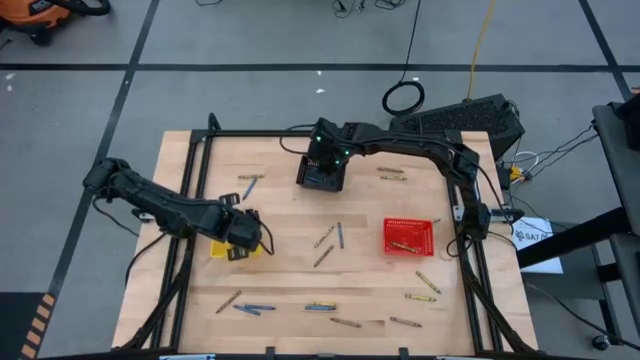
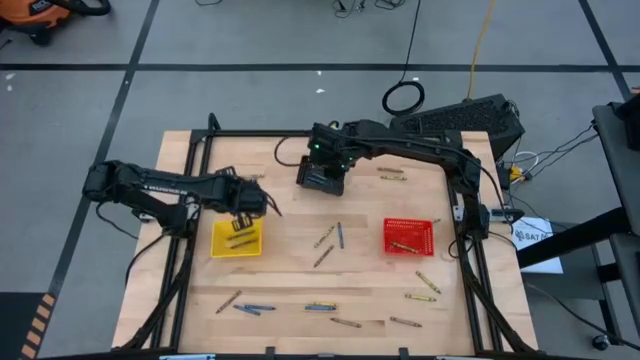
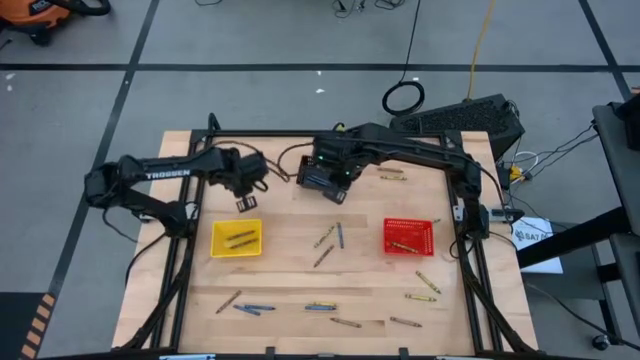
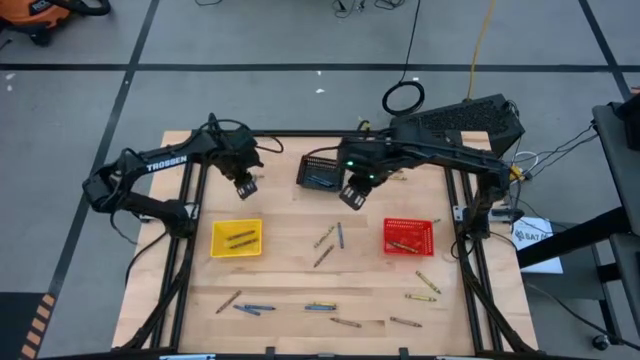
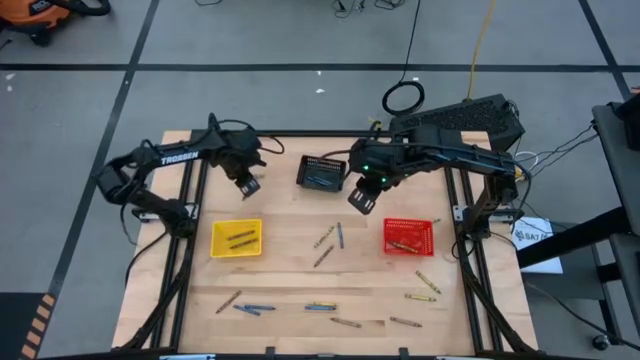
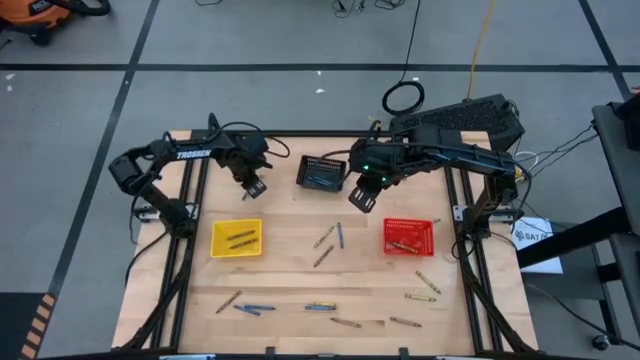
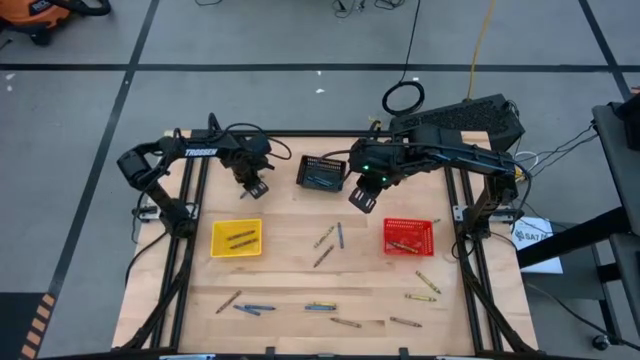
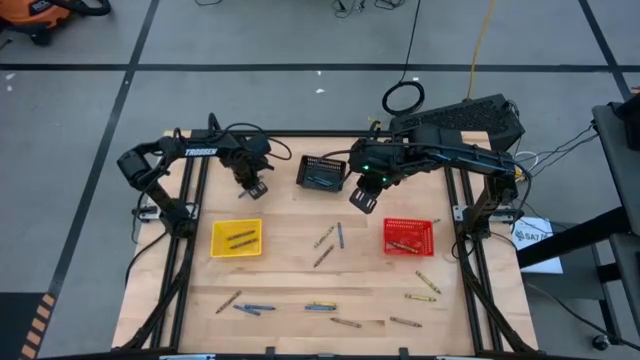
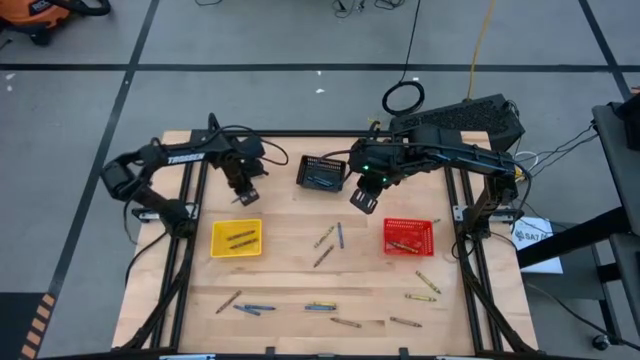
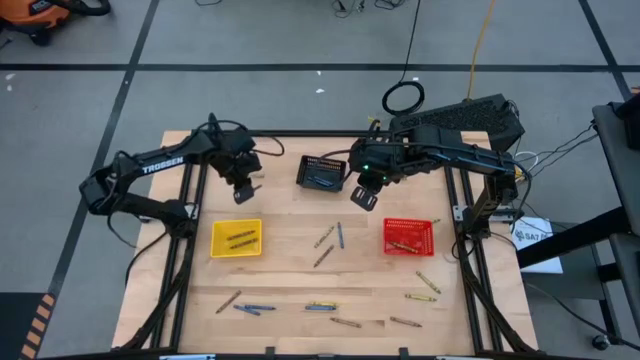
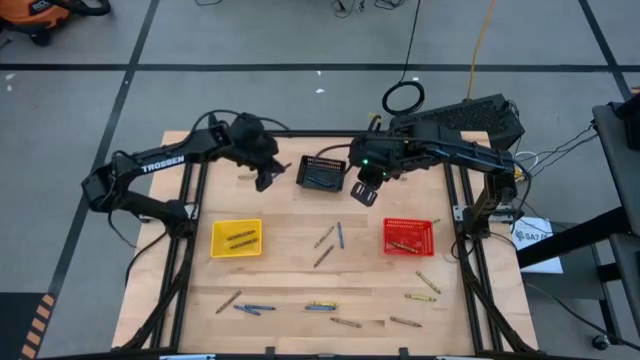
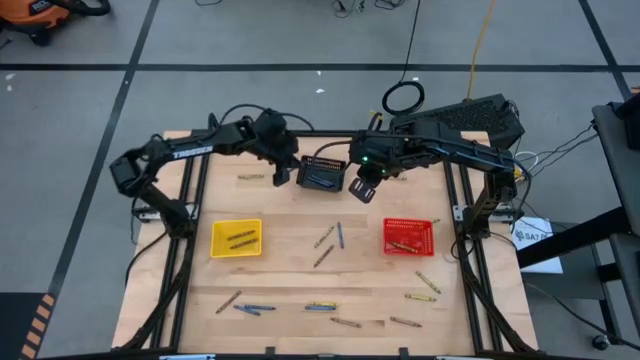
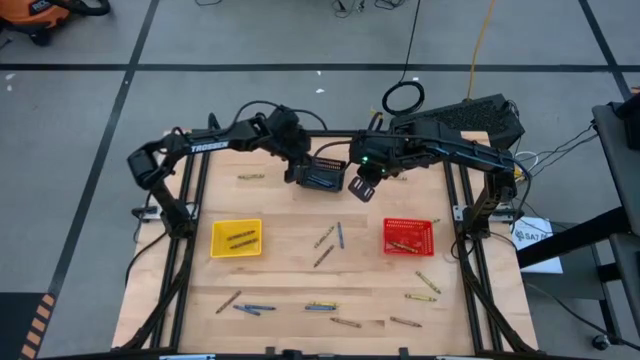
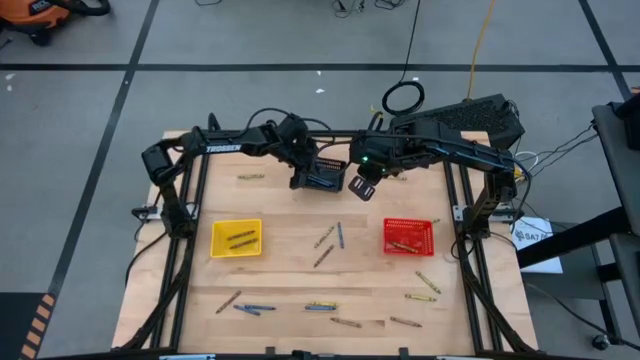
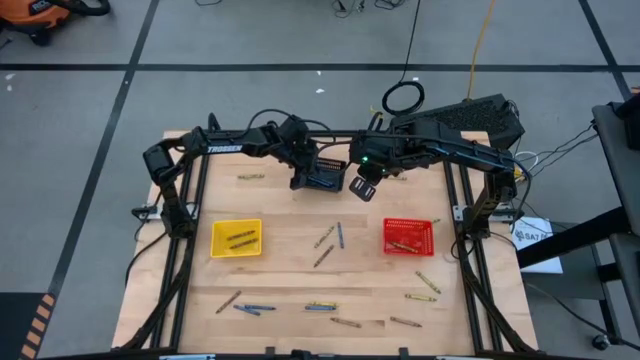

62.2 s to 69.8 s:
Task: Sort crayons
Put the blue crayon into the black bin

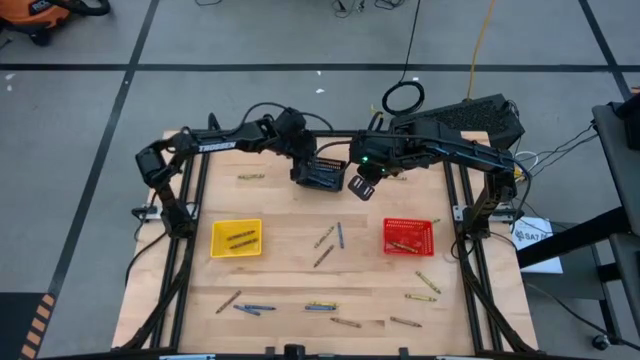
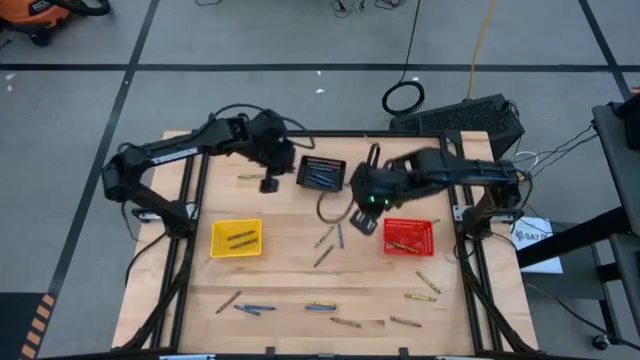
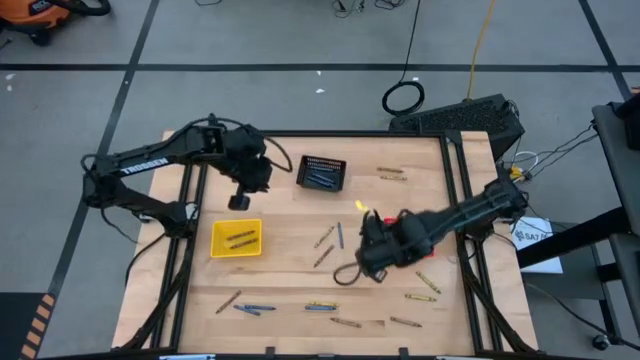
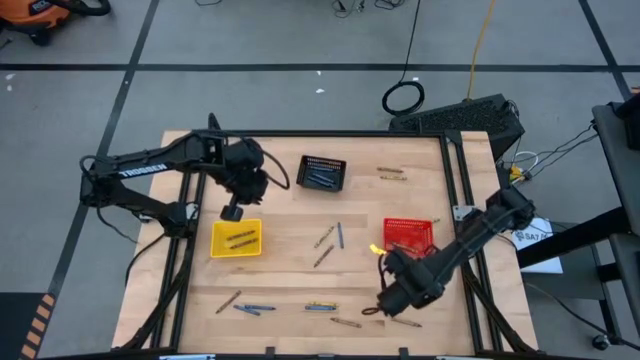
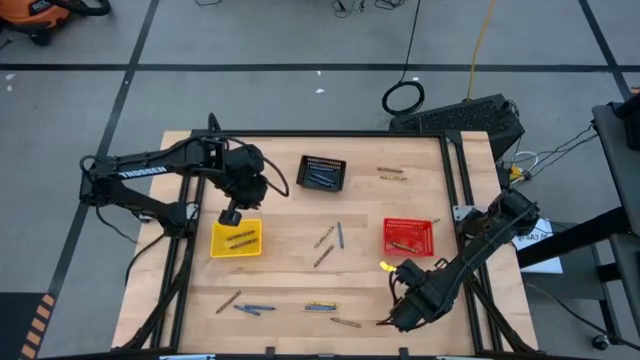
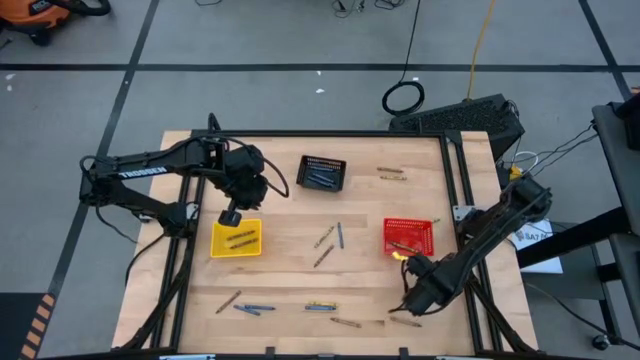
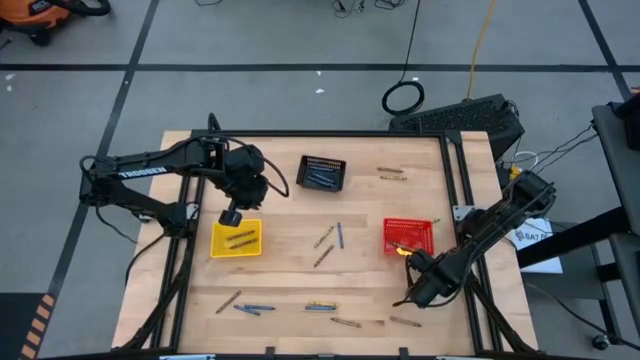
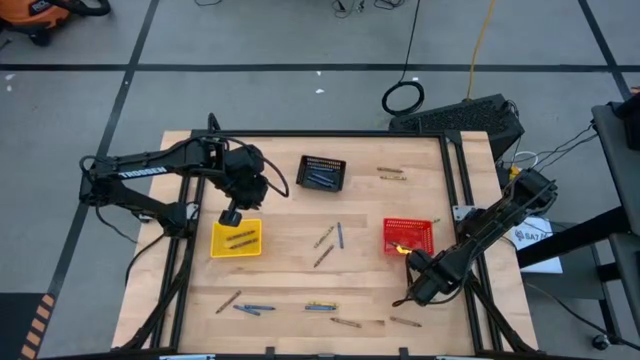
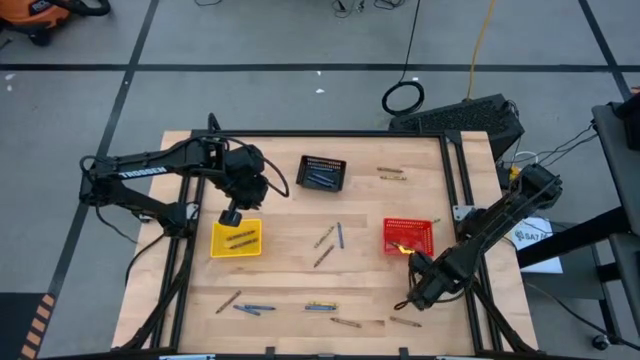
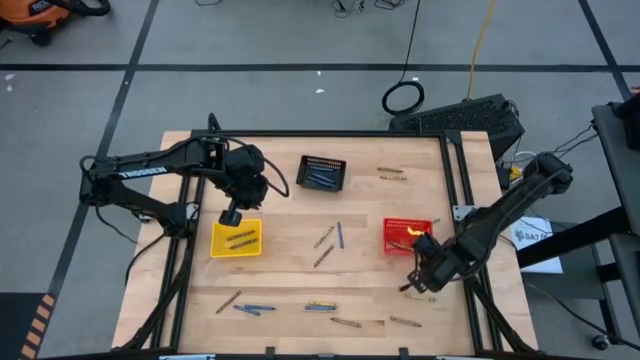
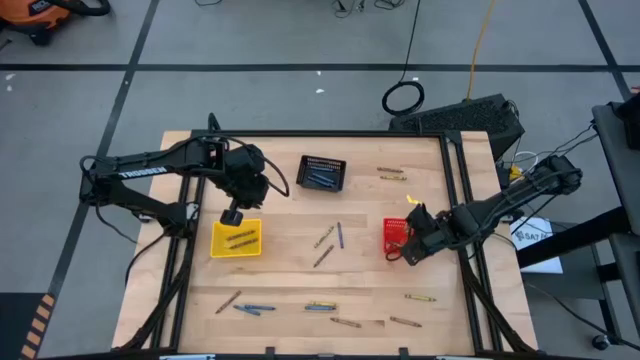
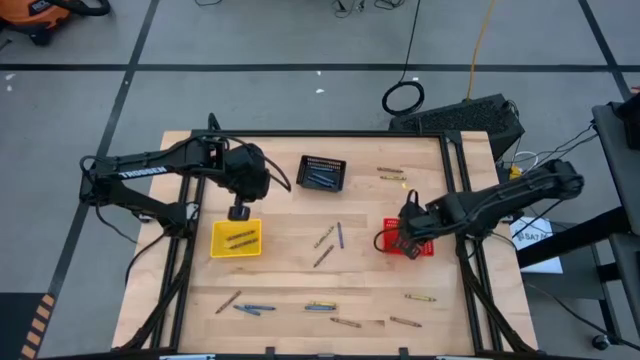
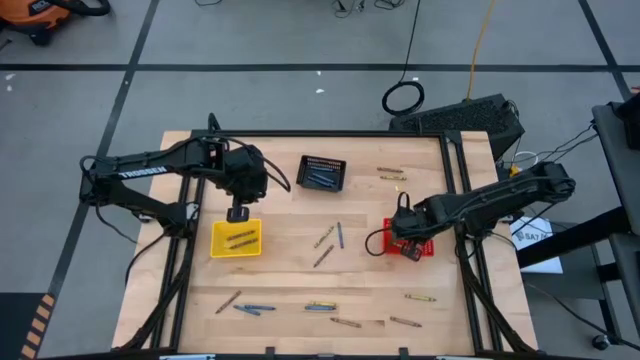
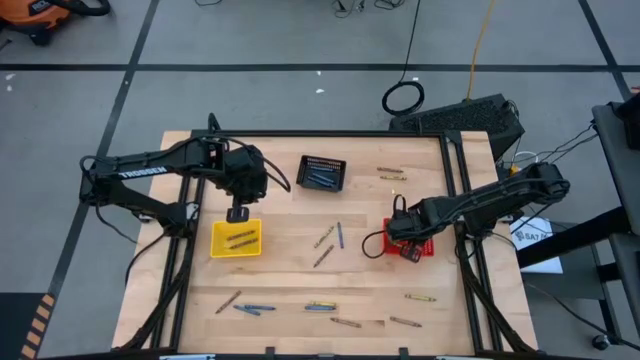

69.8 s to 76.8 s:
Put the green crayon into the red bin

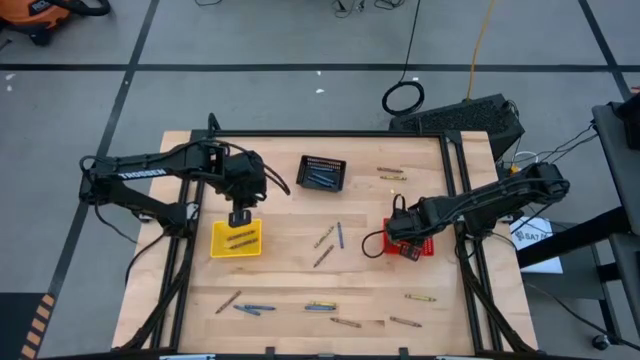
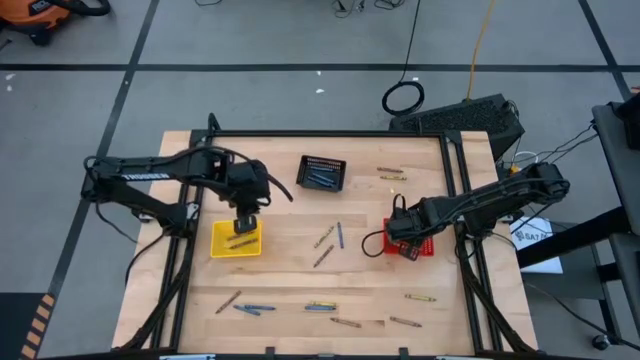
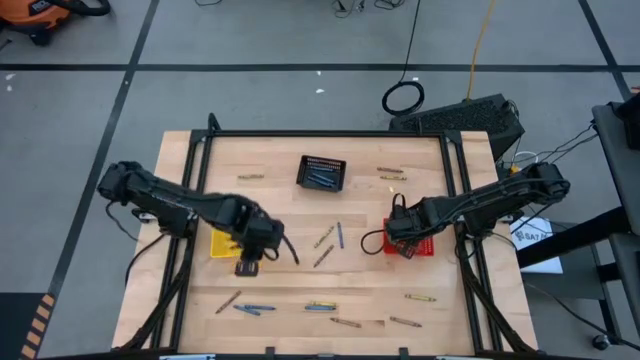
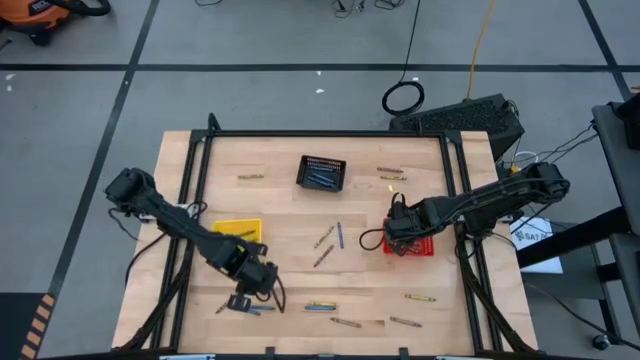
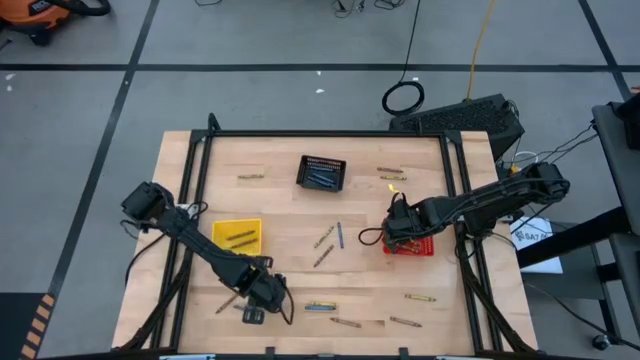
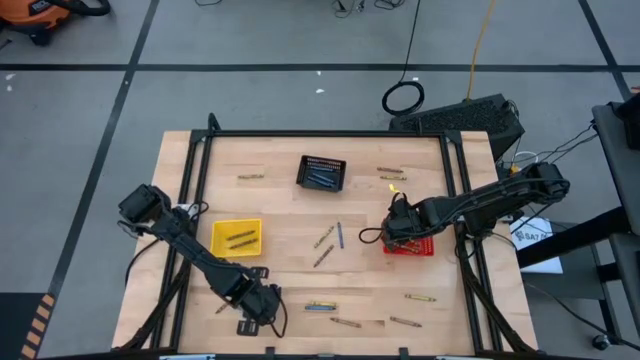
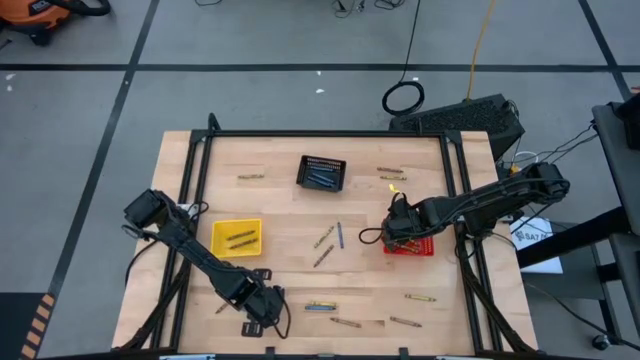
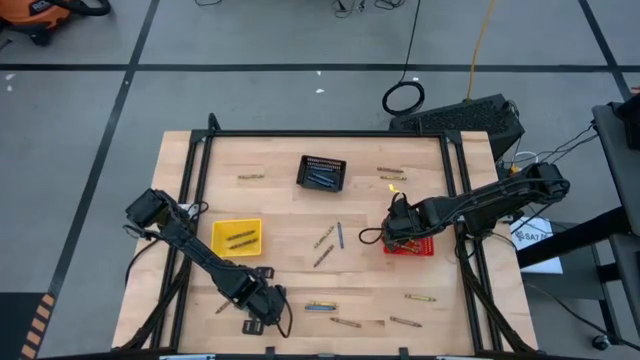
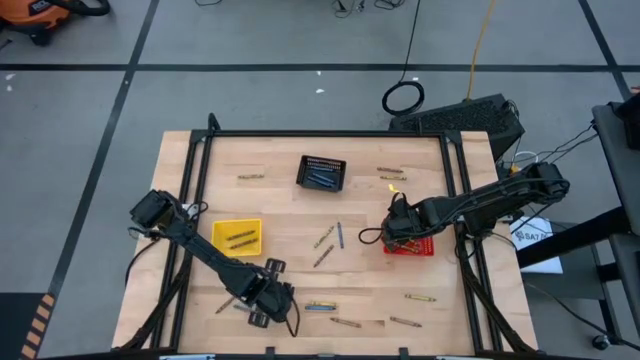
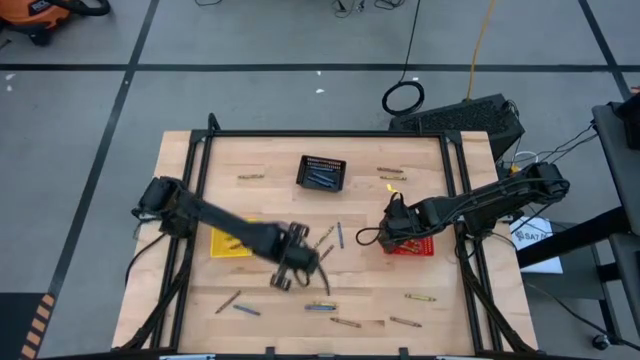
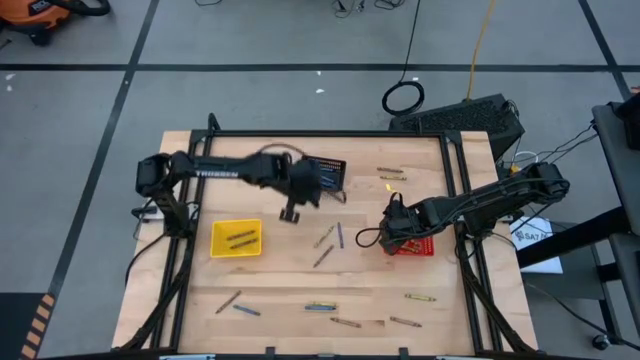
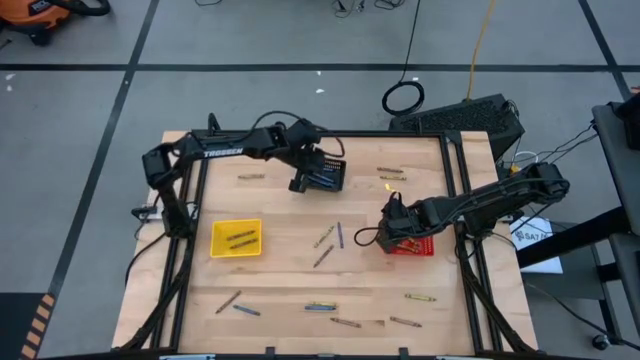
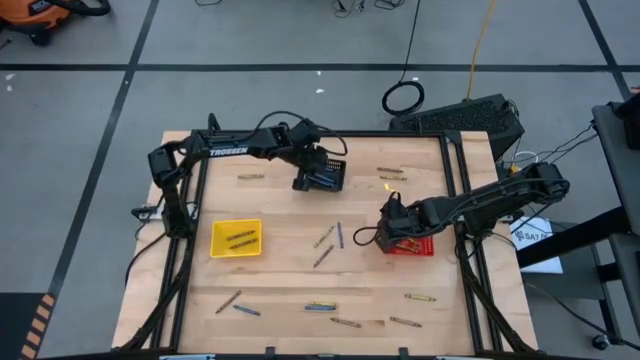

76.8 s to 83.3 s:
Put the blue crayon into the black bin

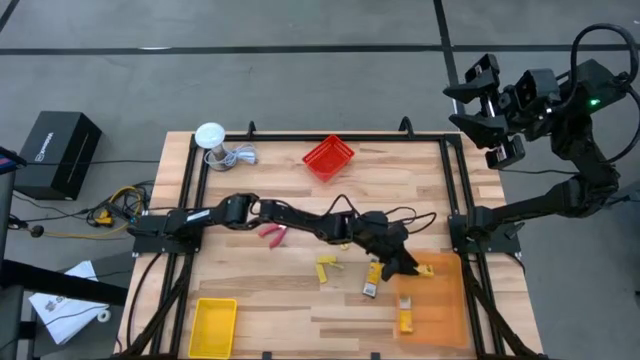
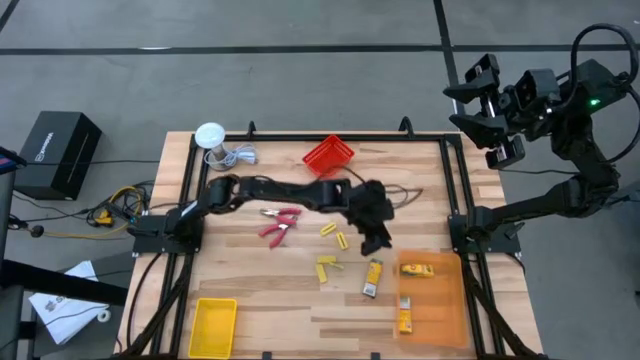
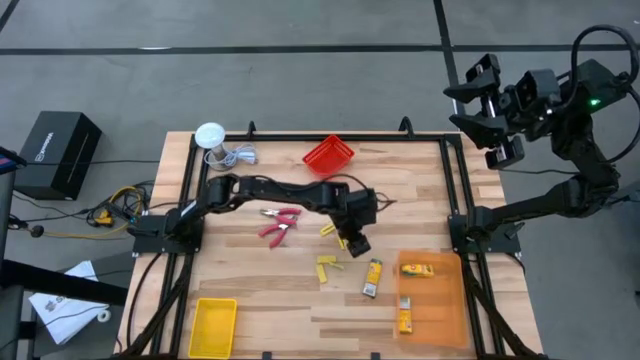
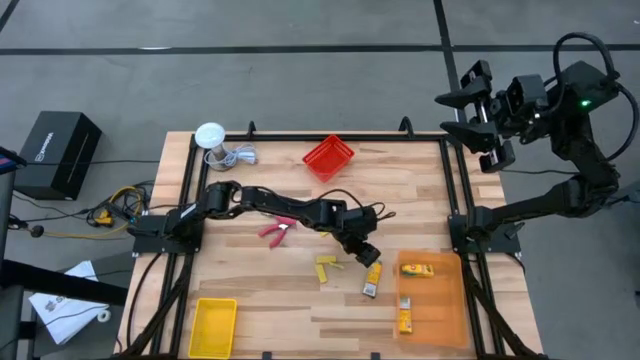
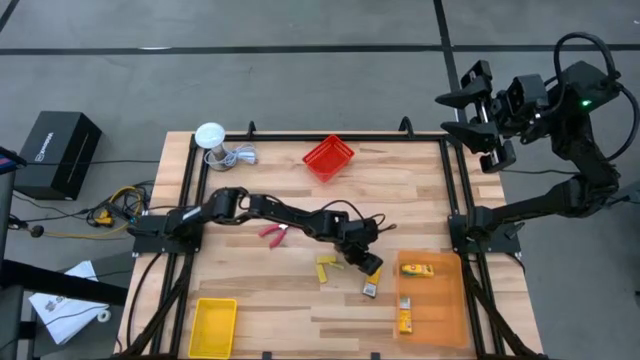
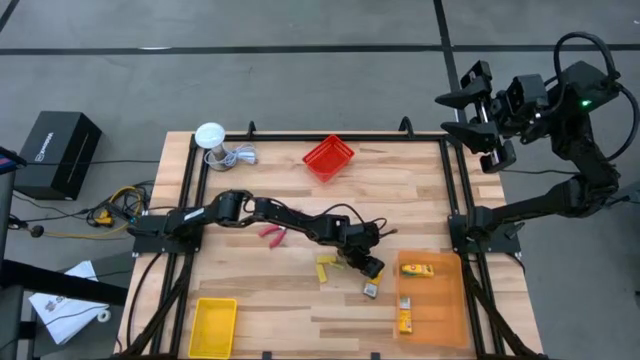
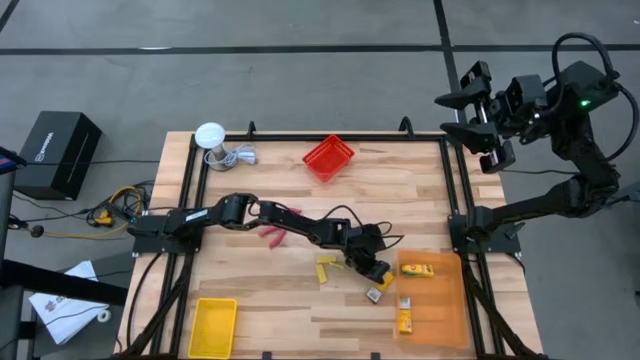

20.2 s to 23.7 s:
Task: Pick & Place School Supplies
Put the crayon box into the orange bin
